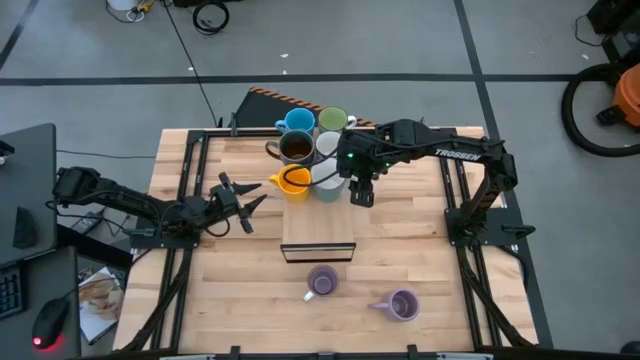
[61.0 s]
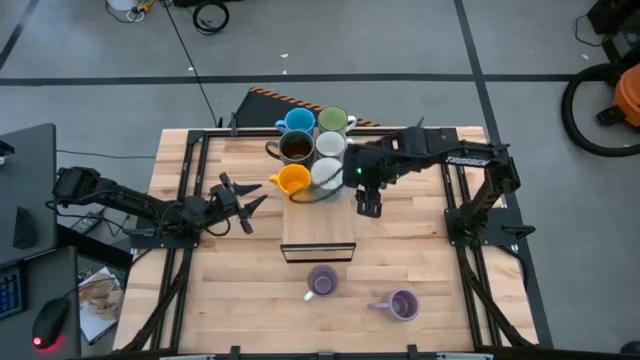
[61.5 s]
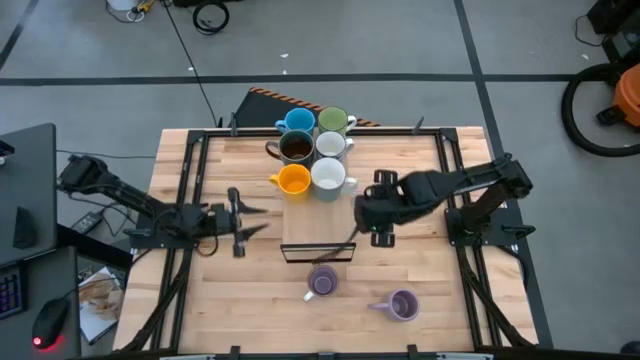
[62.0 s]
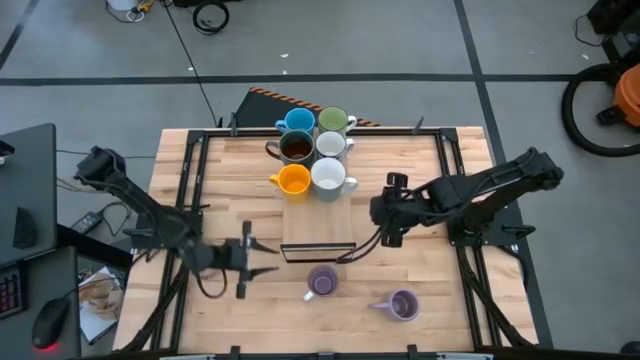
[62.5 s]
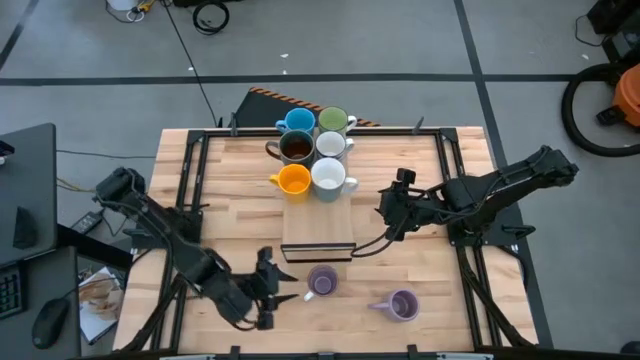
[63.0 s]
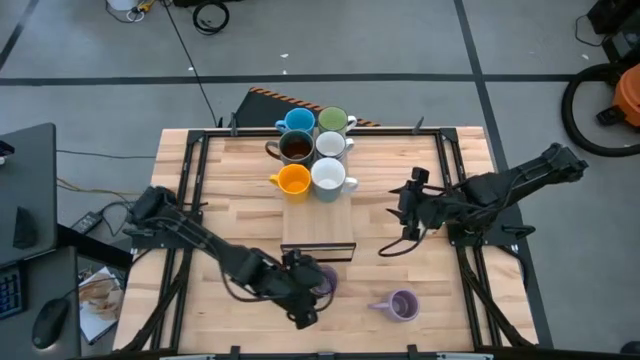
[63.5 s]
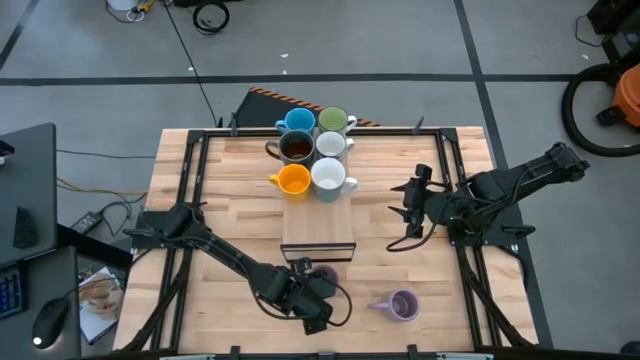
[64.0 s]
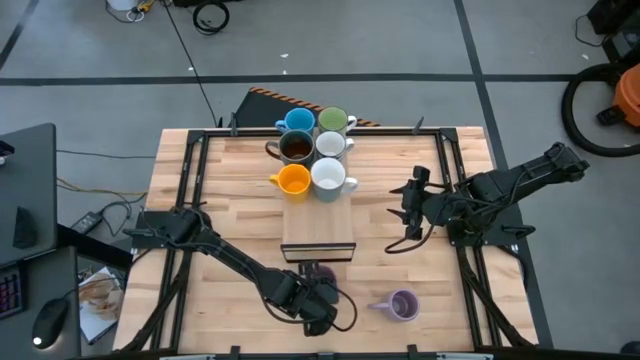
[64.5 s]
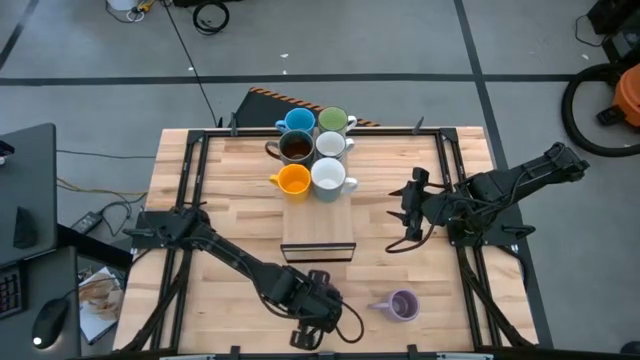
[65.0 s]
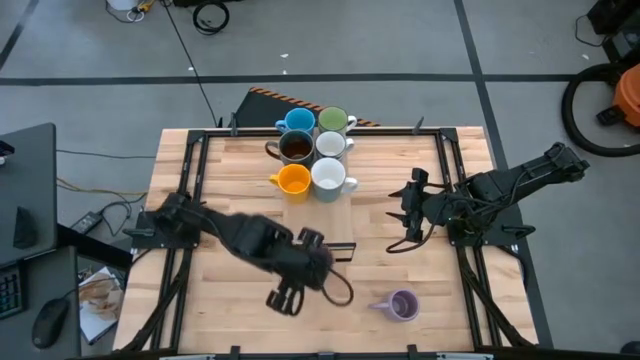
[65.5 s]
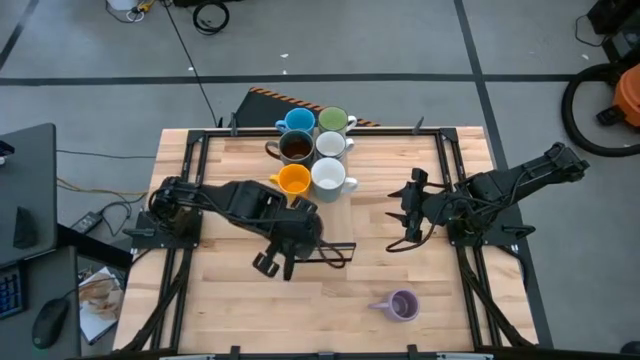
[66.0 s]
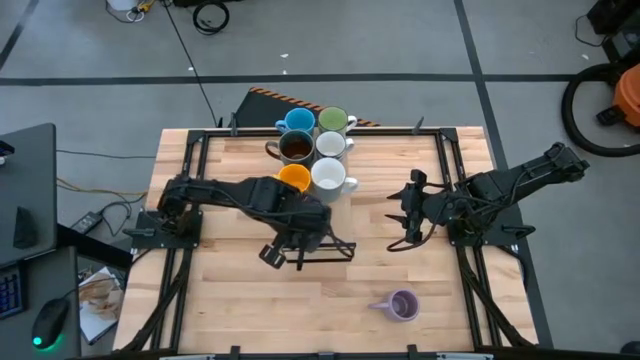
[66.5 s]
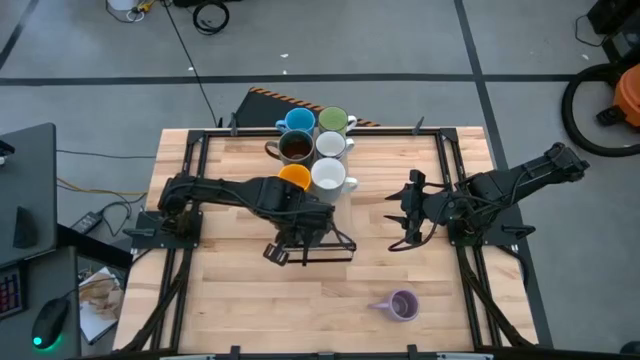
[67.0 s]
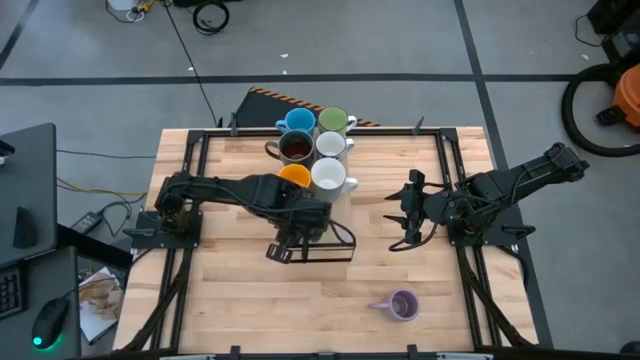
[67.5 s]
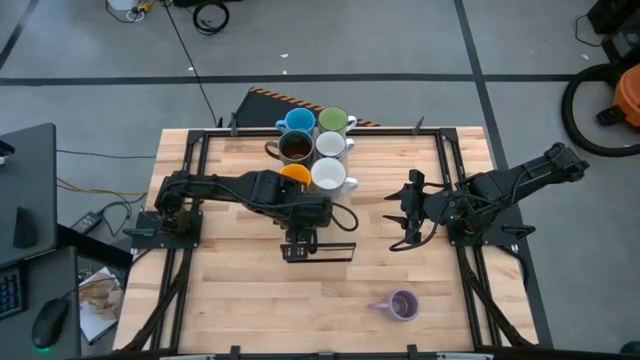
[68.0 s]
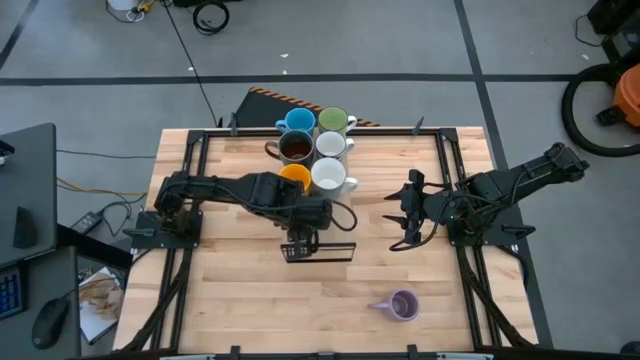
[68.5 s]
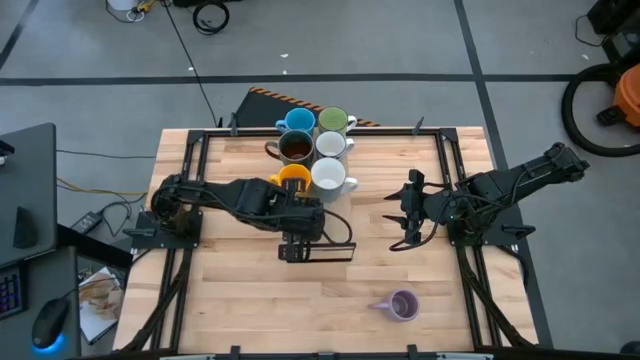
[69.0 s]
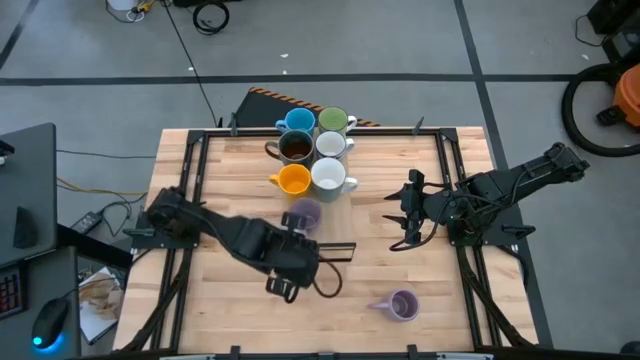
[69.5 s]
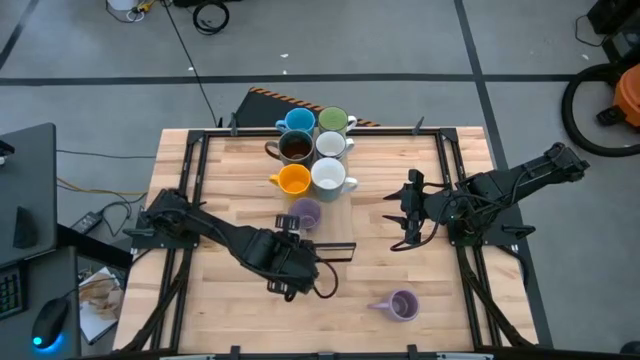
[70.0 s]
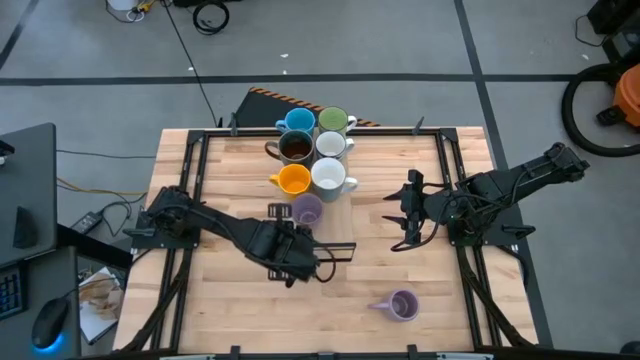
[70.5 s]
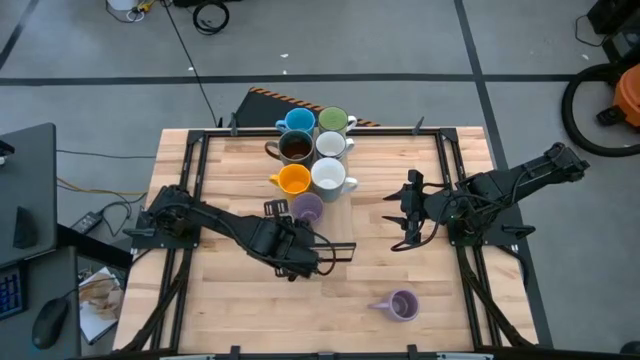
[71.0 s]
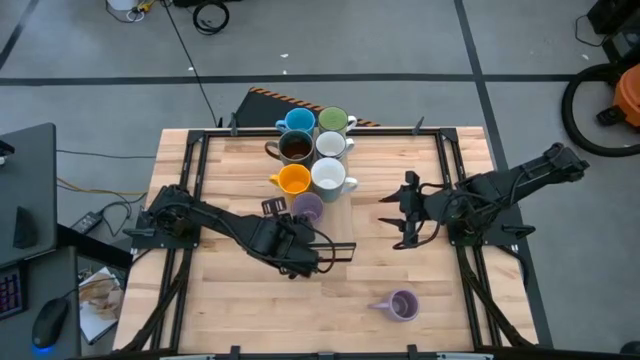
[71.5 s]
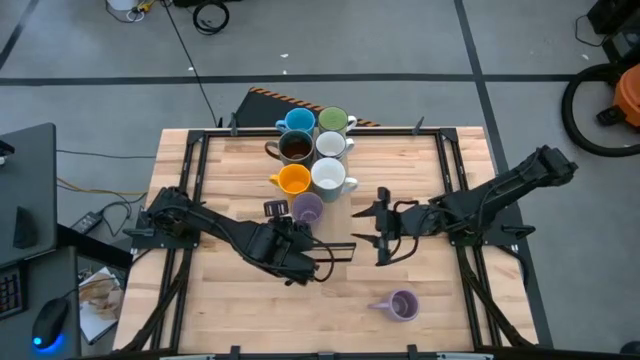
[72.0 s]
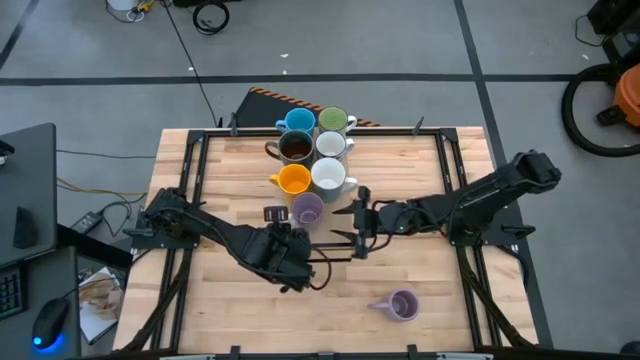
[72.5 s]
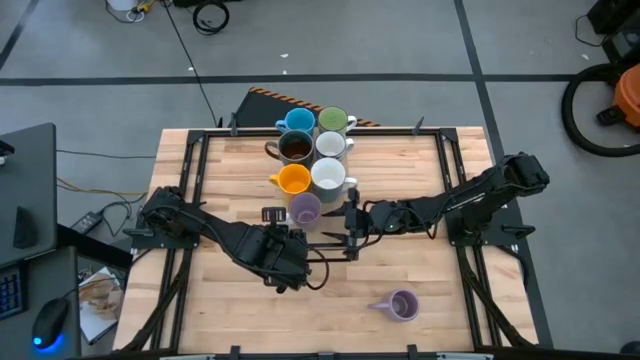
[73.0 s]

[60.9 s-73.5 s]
Task: Place coffee mugs
Put the violet mug on the shelf

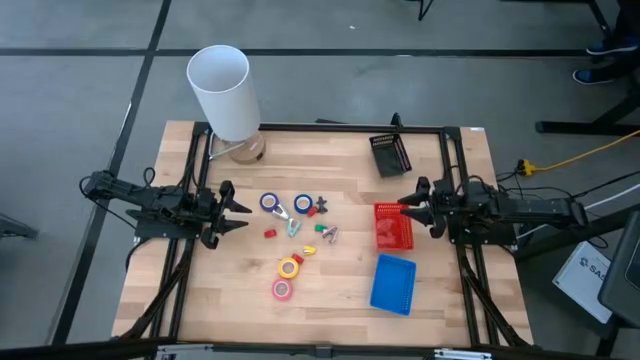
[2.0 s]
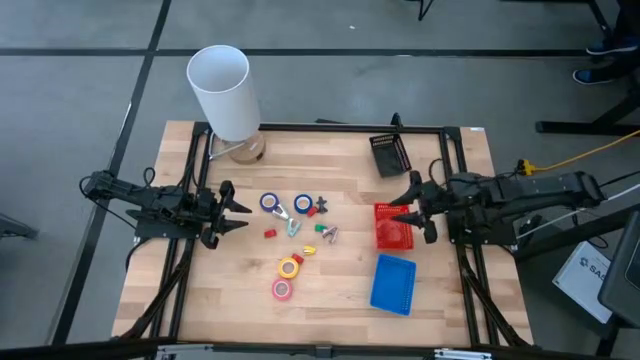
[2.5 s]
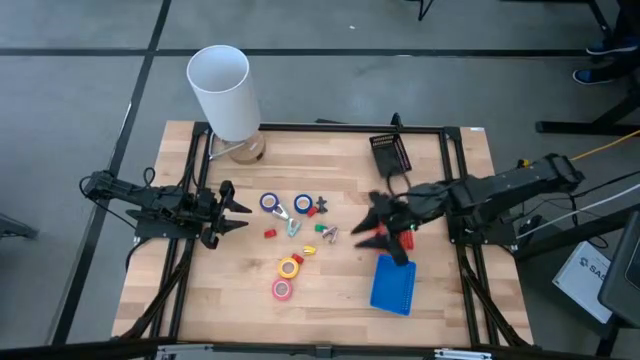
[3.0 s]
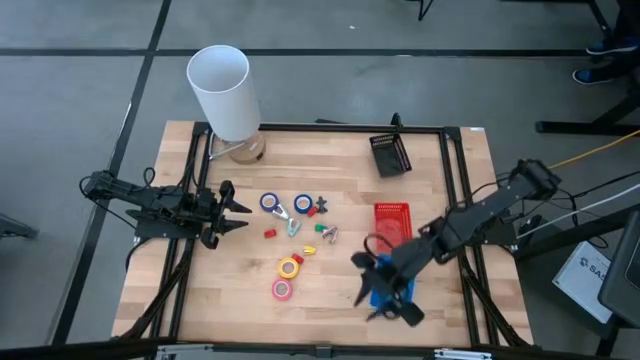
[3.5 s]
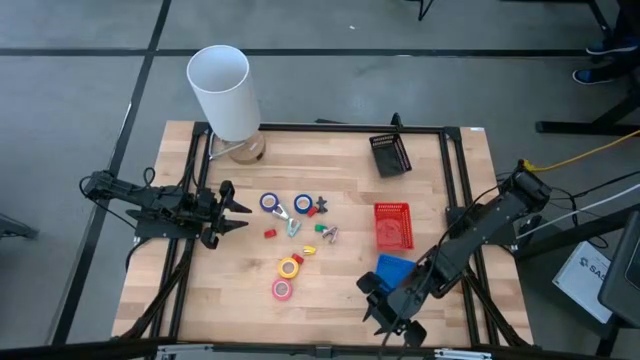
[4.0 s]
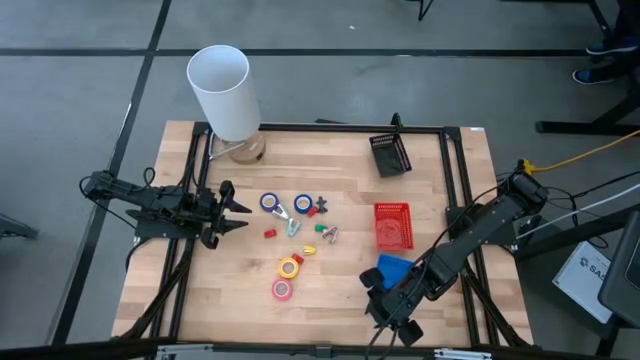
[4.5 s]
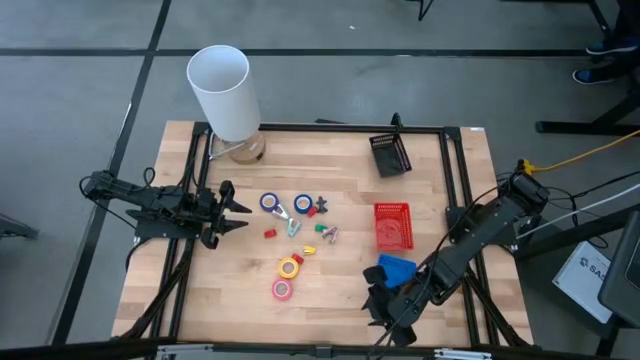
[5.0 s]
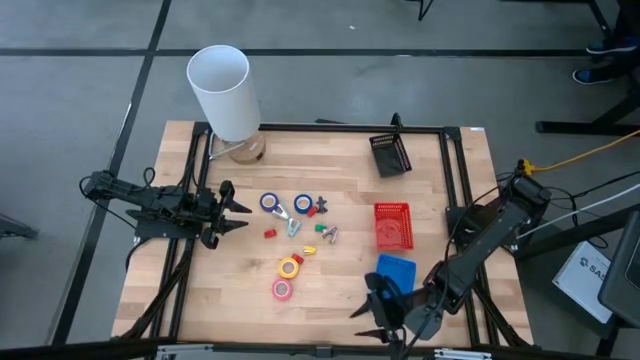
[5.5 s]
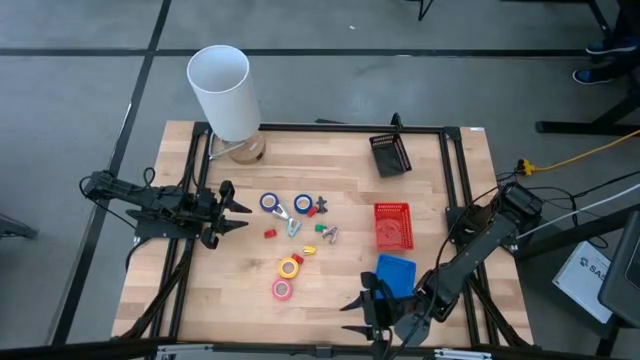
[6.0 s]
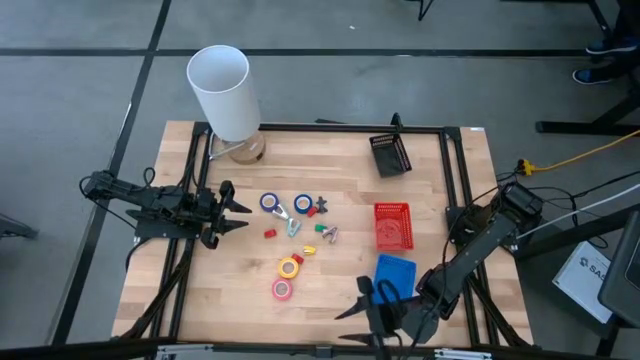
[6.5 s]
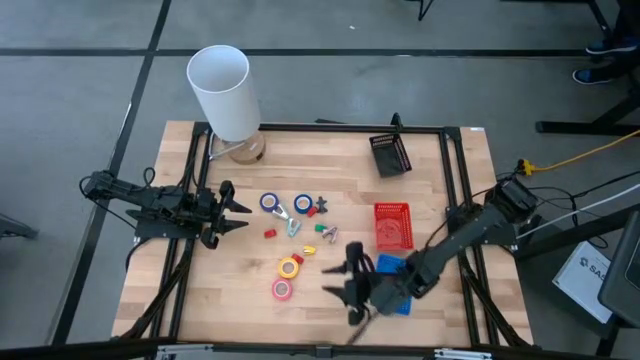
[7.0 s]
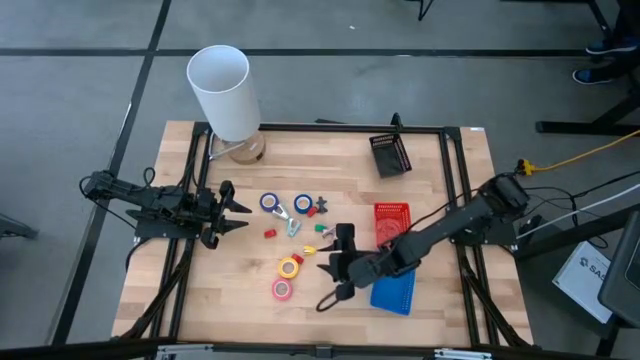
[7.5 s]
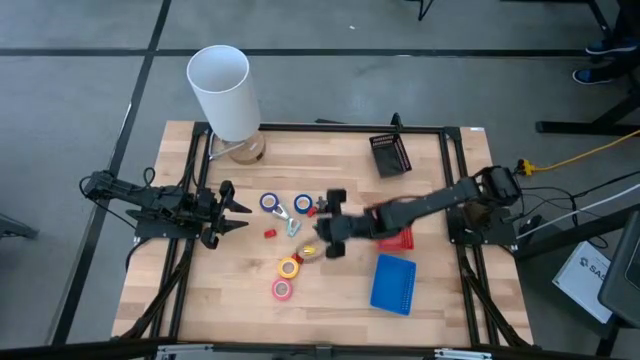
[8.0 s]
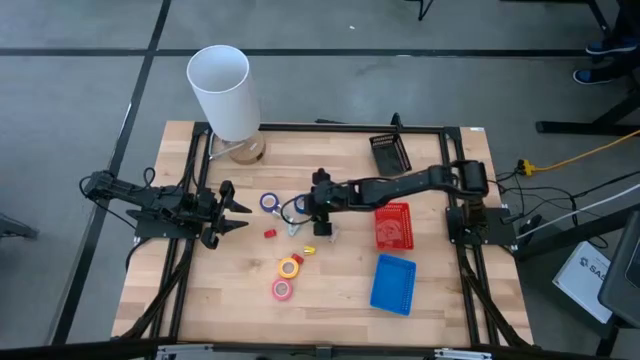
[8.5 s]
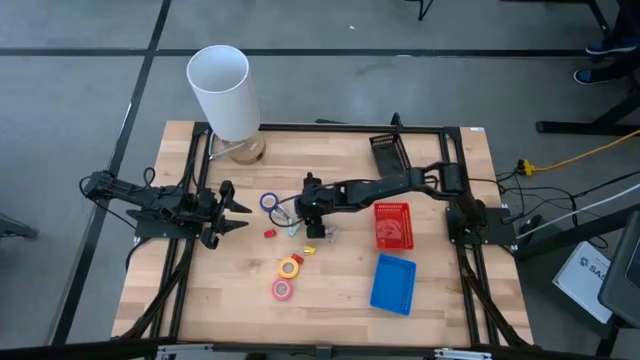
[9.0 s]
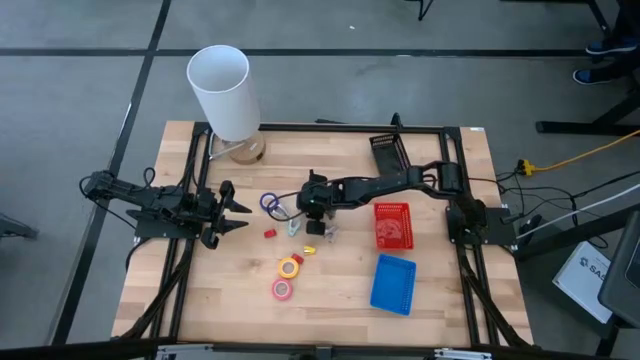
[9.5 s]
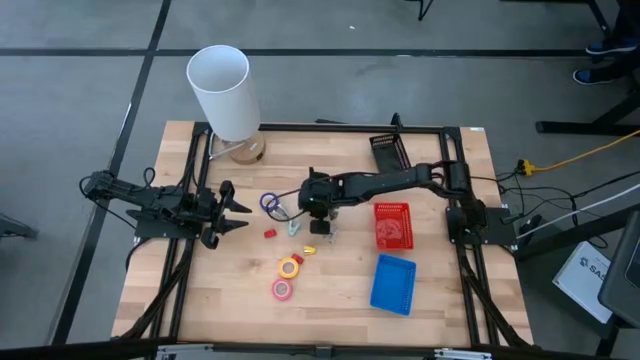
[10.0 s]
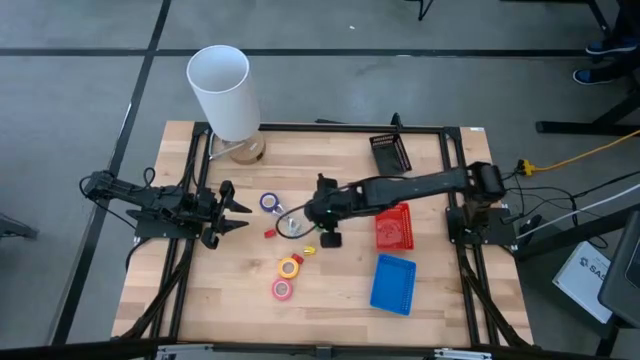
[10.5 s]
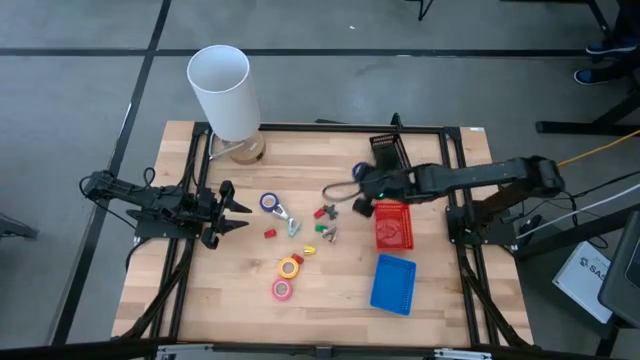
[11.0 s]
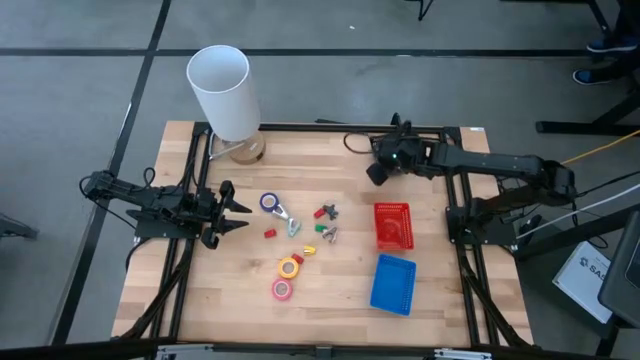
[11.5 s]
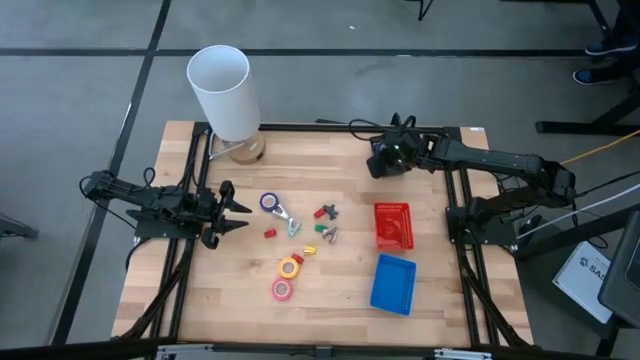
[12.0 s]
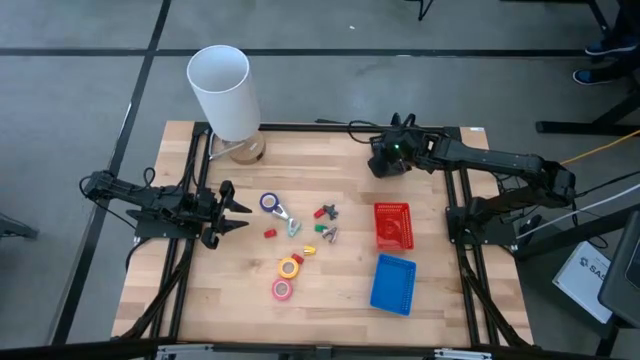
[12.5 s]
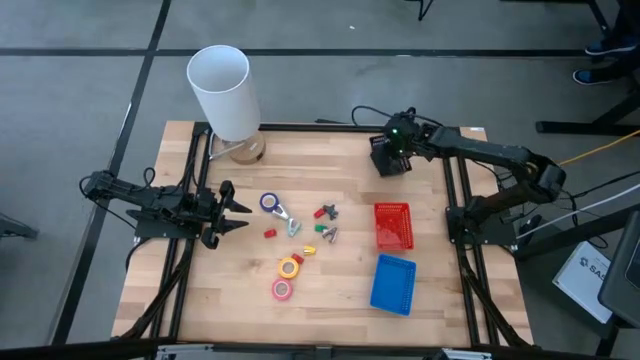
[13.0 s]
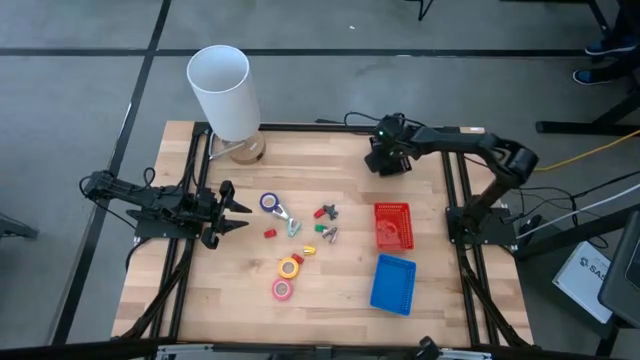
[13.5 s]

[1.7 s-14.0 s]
Task: Pick and place Stapler, Stapler remover, tape
Put the blue tape into the black basket
